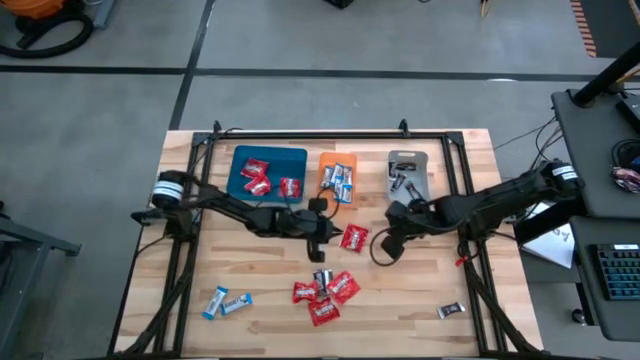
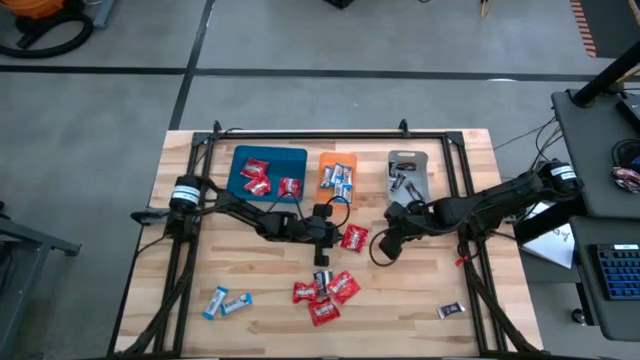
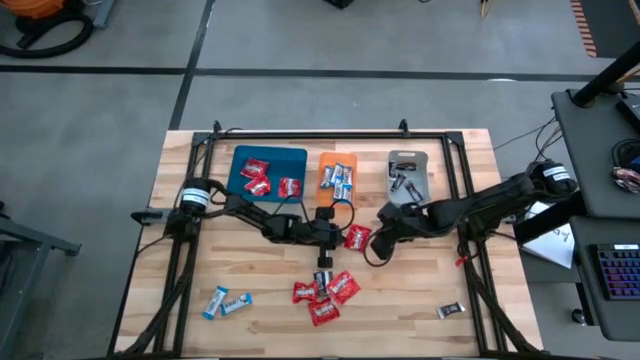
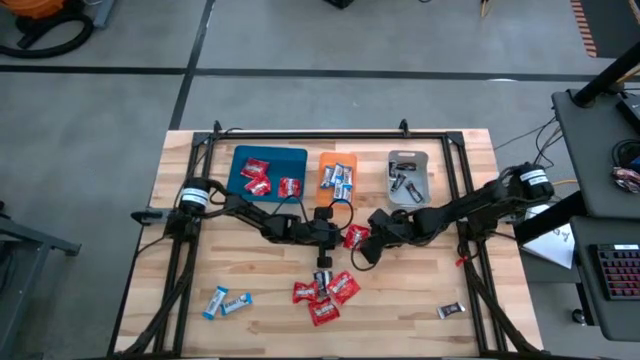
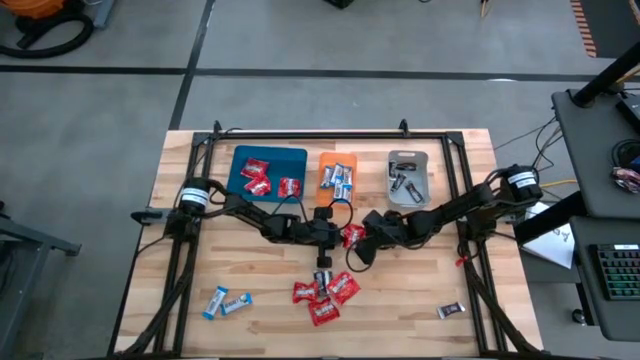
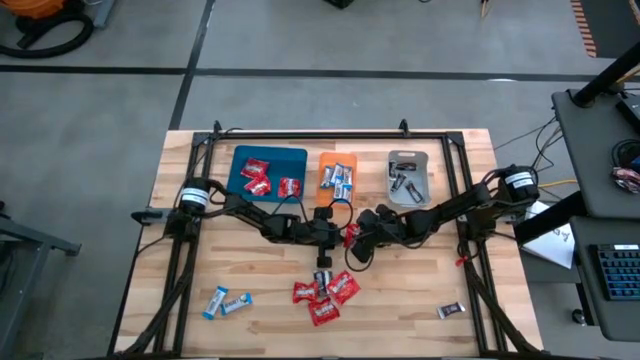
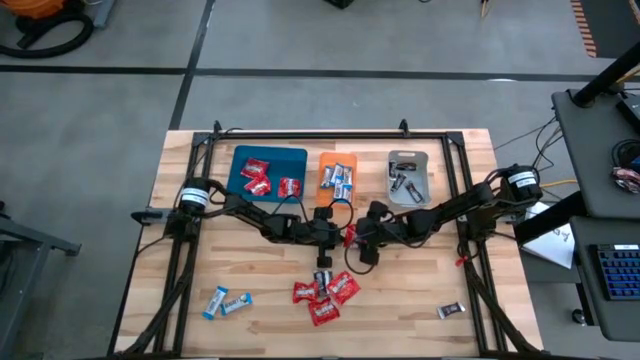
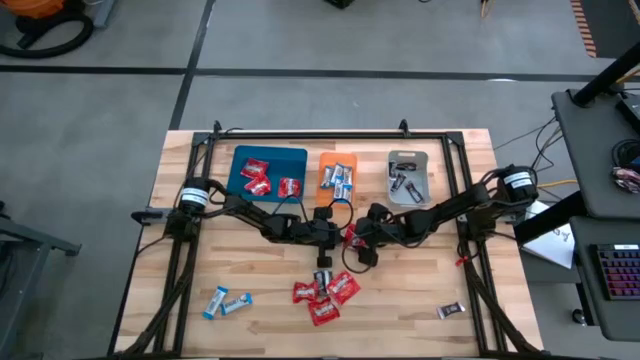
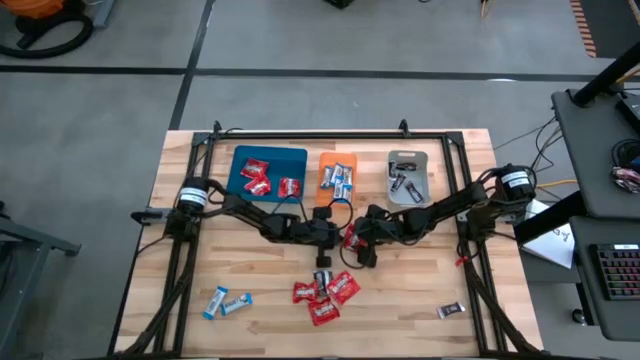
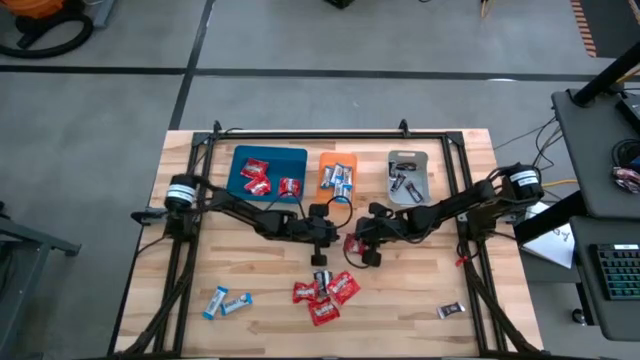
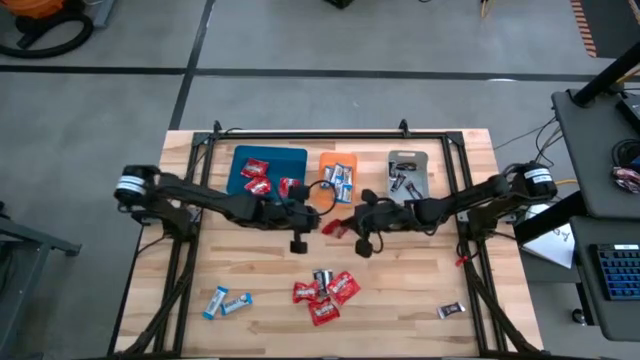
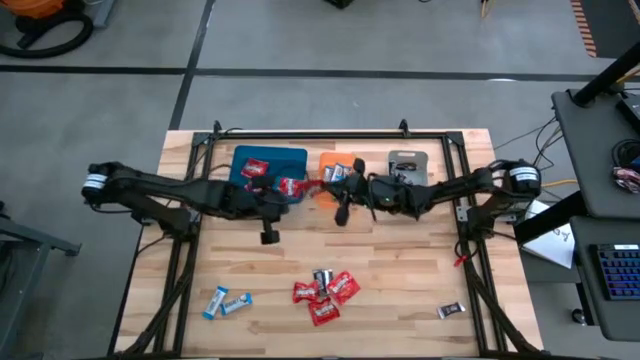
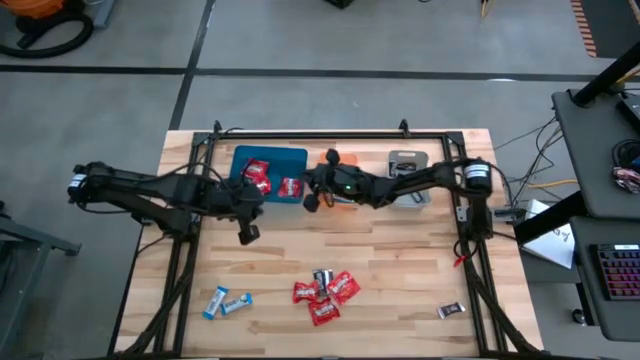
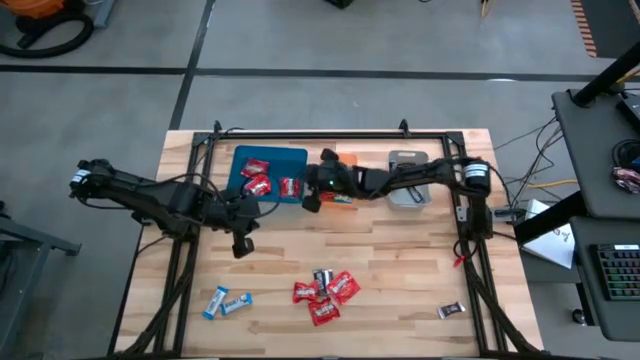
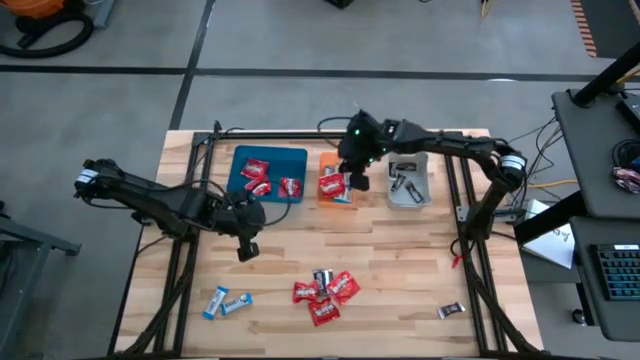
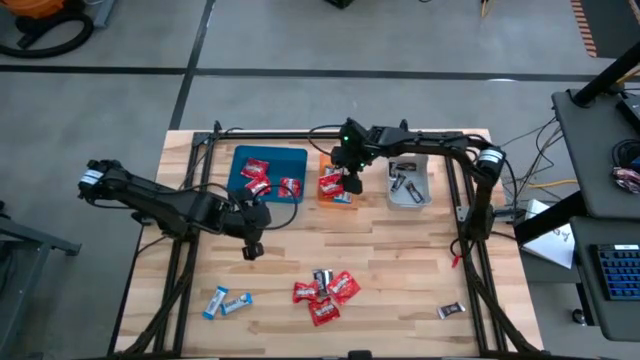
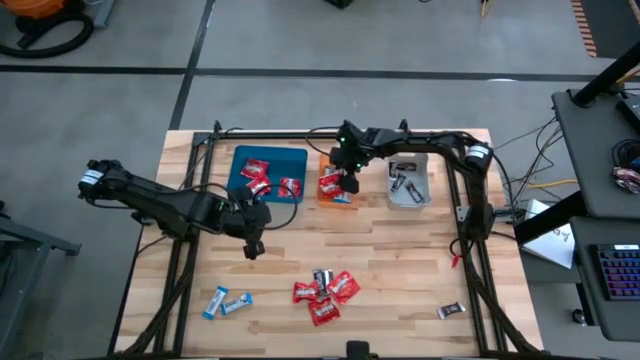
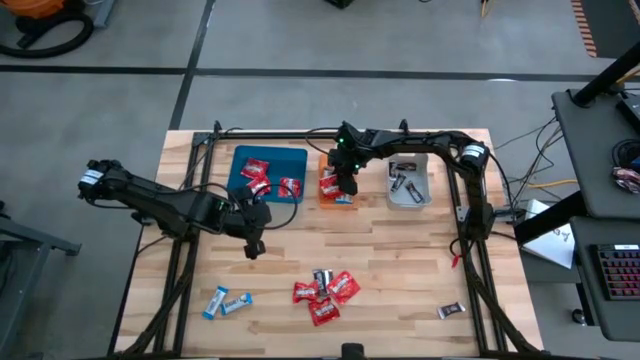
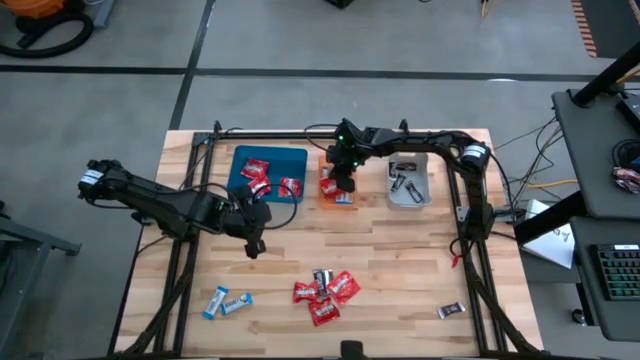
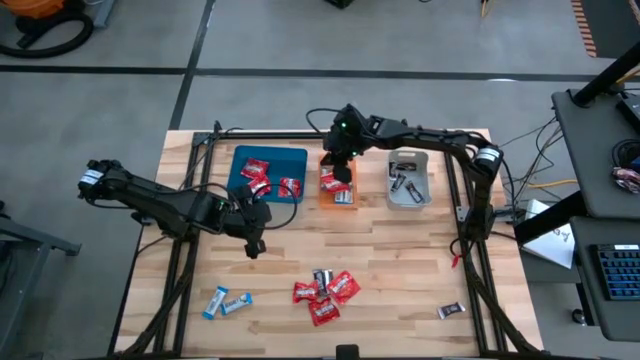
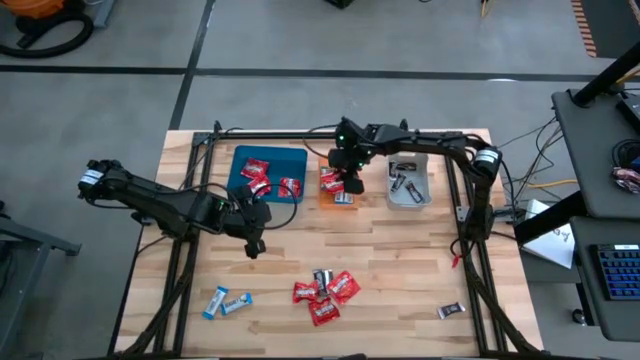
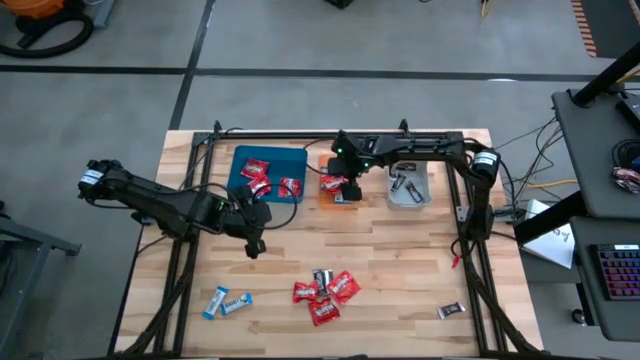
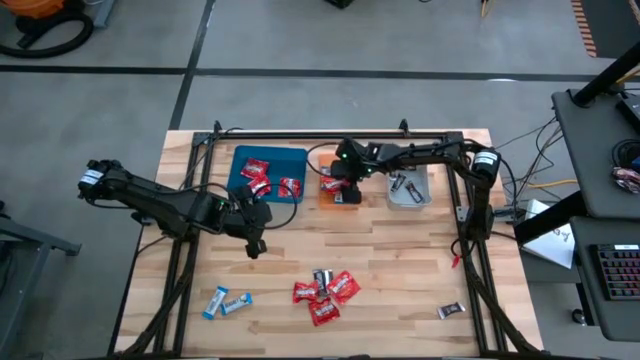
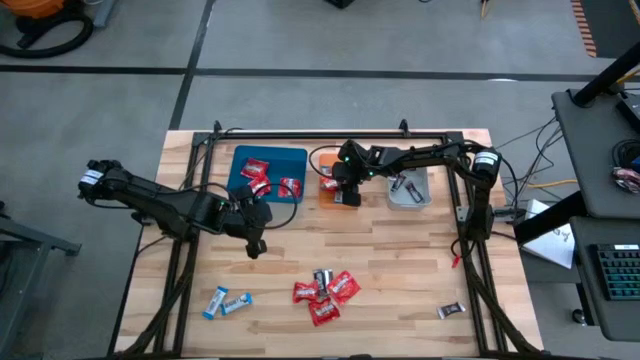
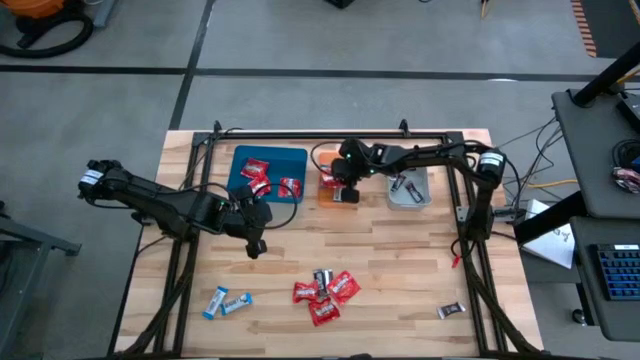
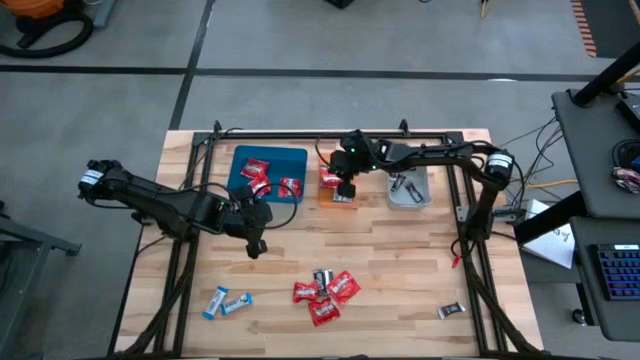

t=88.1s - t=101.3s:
Task: Sort candy
Put the red candy into the blue bin

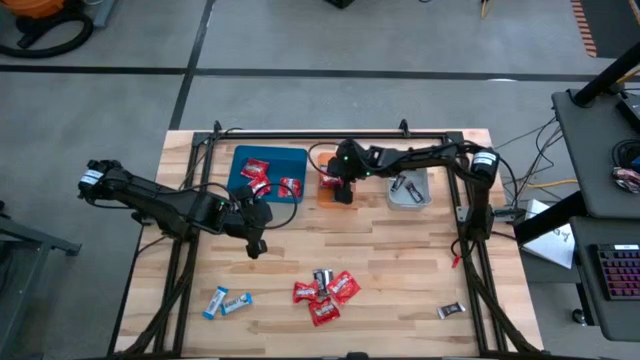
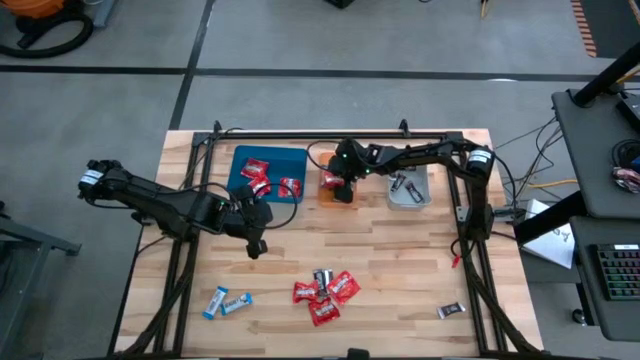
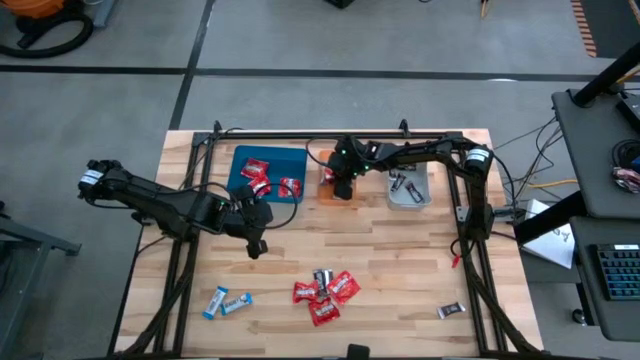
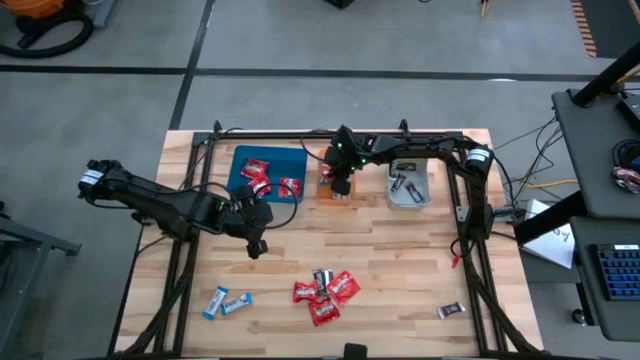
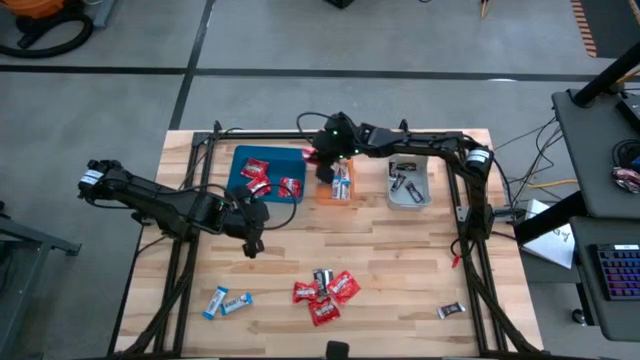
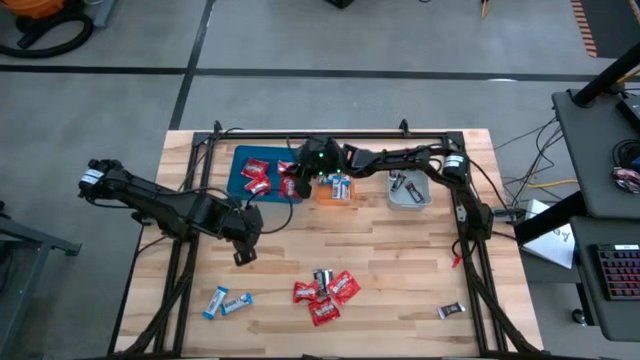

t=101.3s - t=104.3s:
Put the red candy into the blue bin

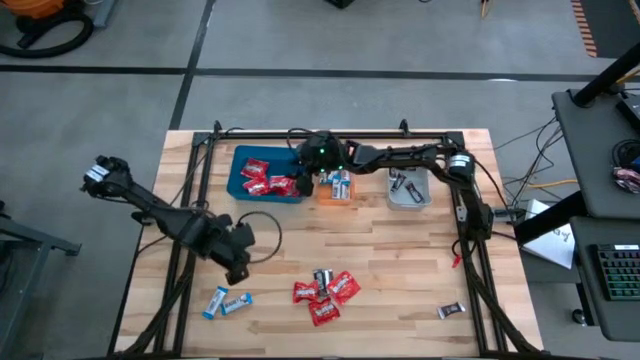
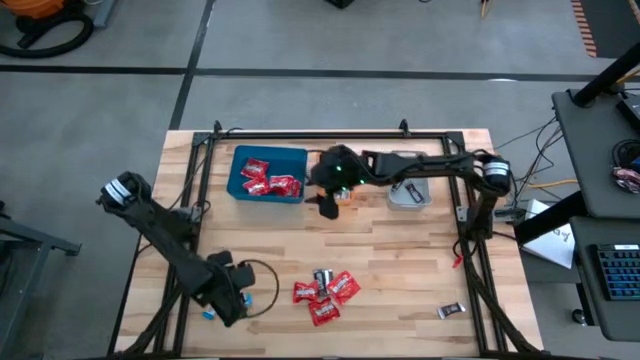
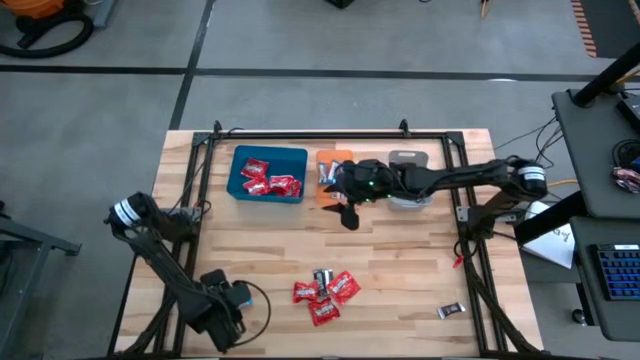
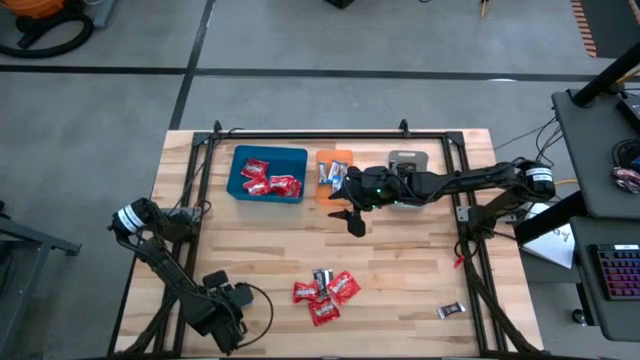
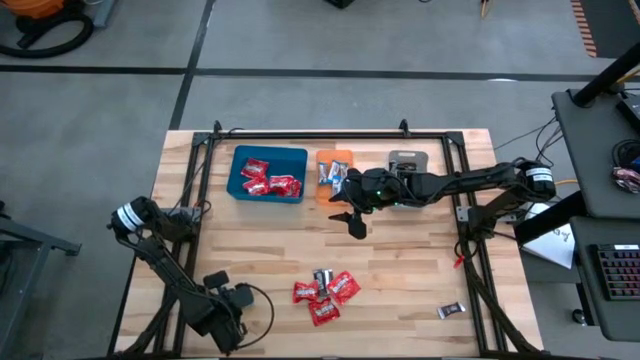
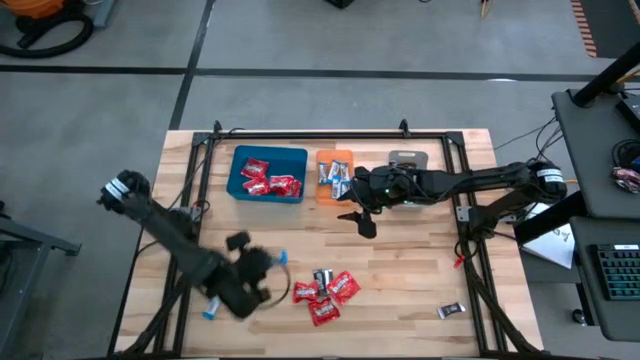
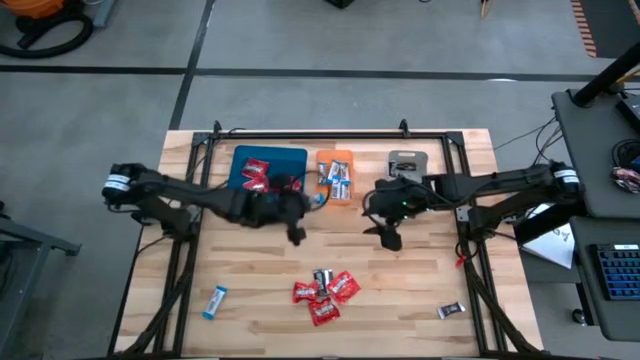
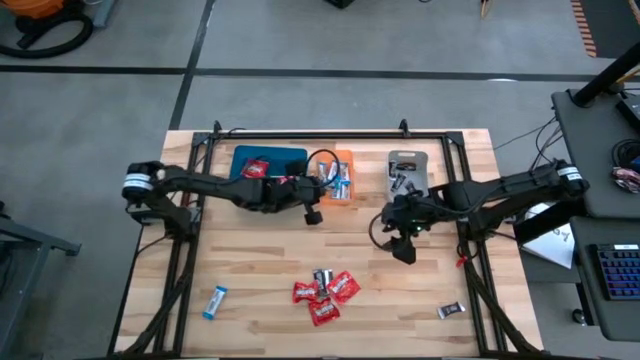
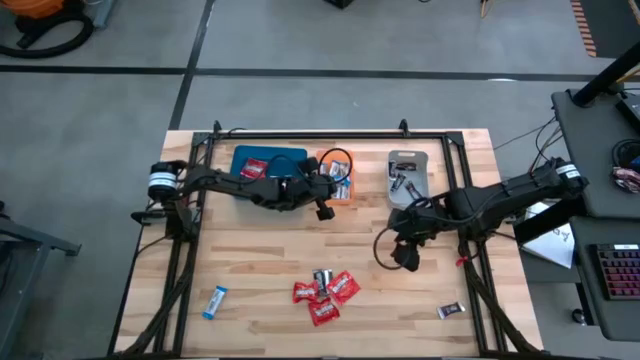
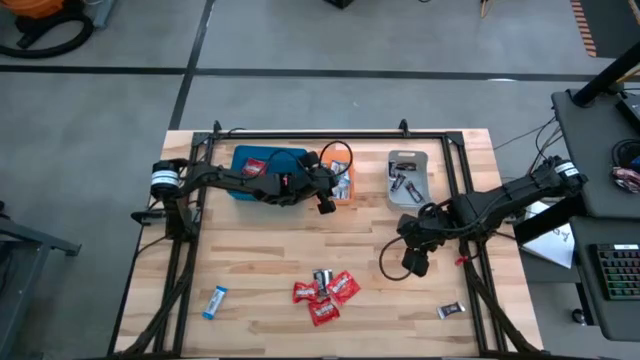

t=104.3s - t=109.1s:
Put the white chocolate bar into the orange bin

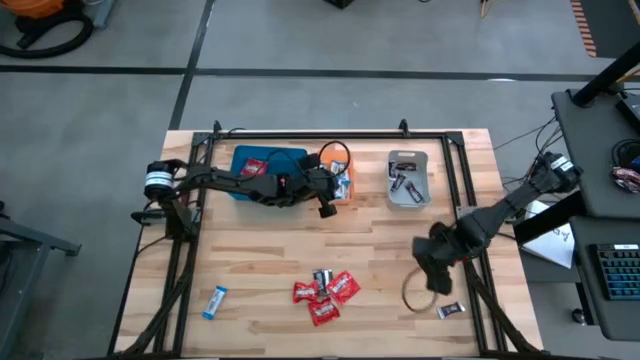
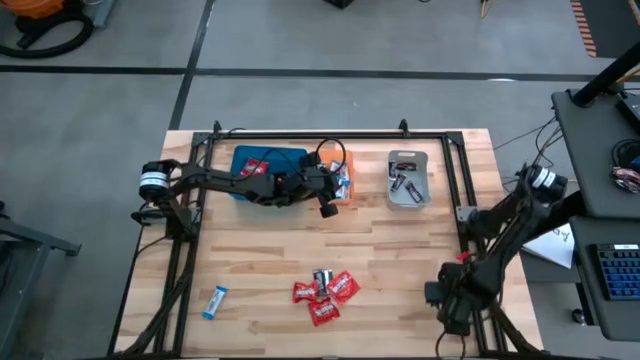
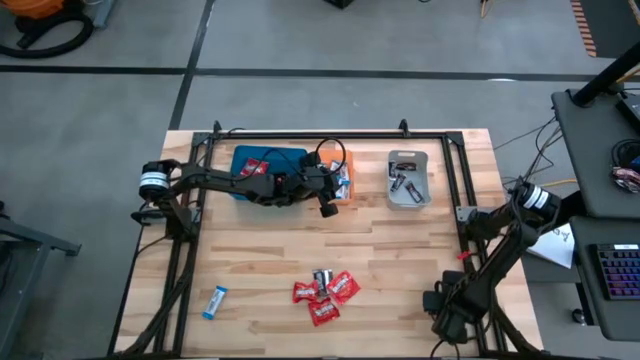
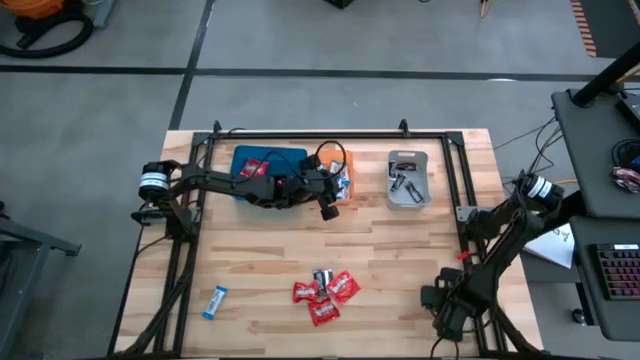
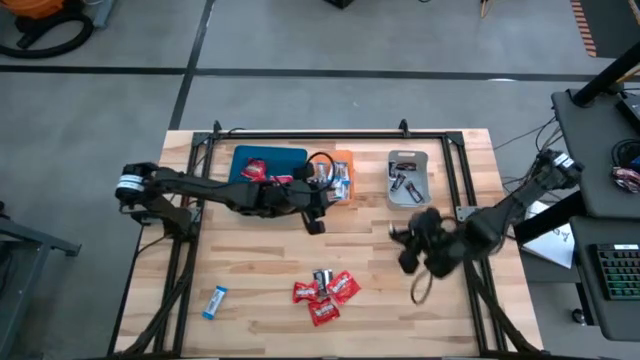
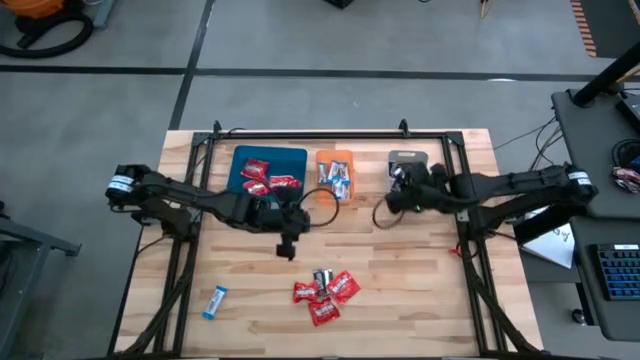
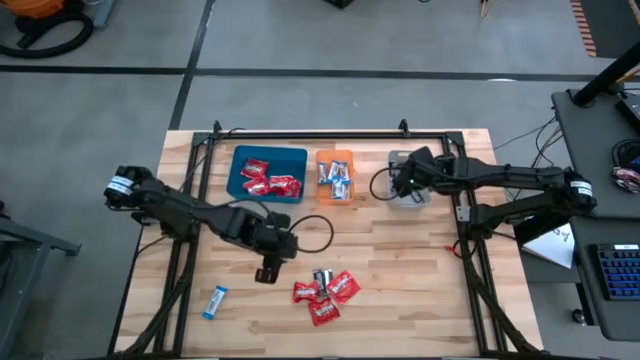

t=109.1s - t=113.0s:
Put the brown chocolate bar into the gray bin
